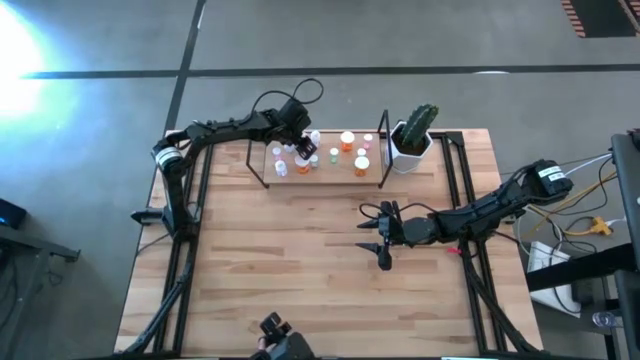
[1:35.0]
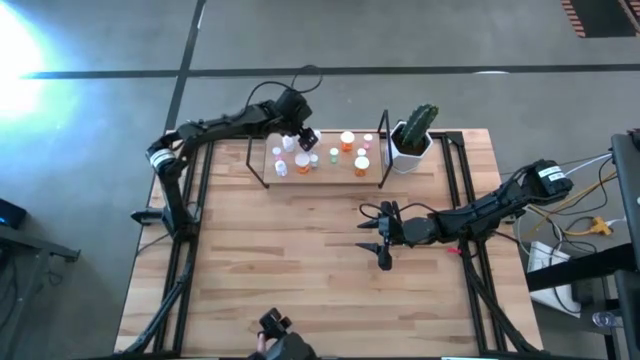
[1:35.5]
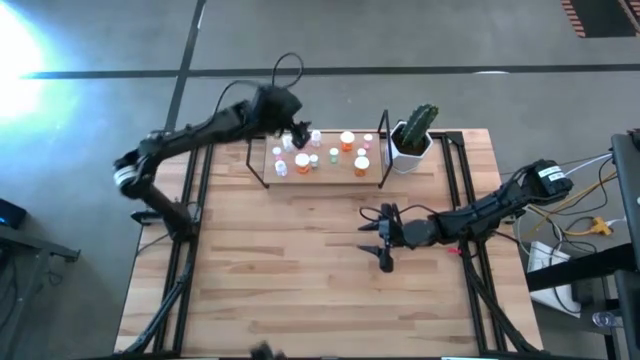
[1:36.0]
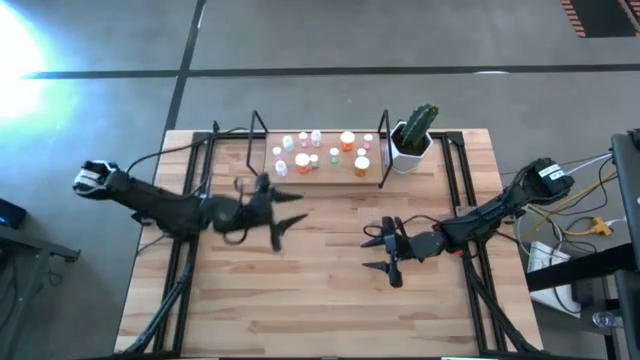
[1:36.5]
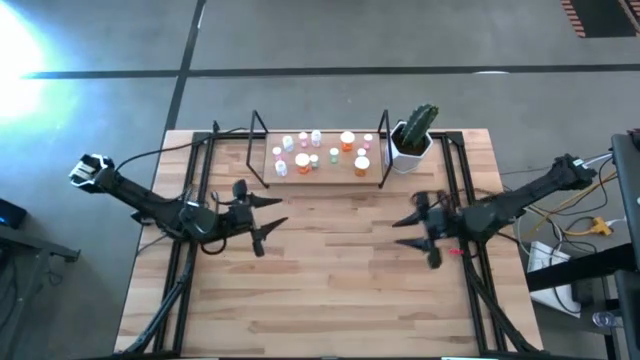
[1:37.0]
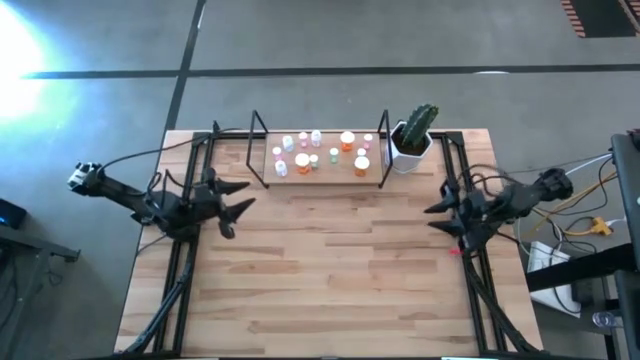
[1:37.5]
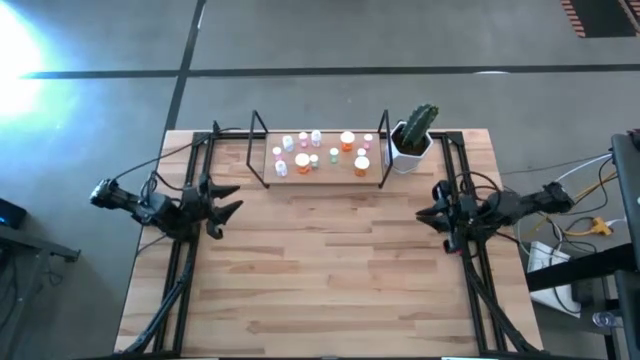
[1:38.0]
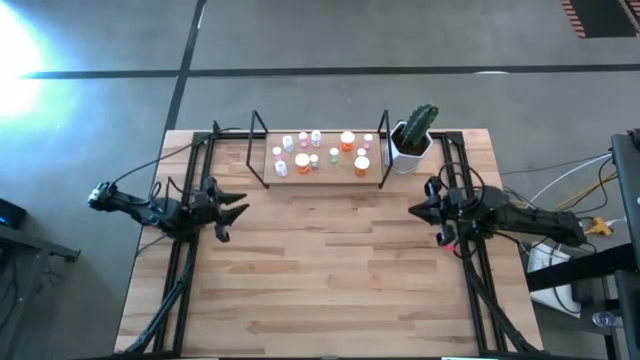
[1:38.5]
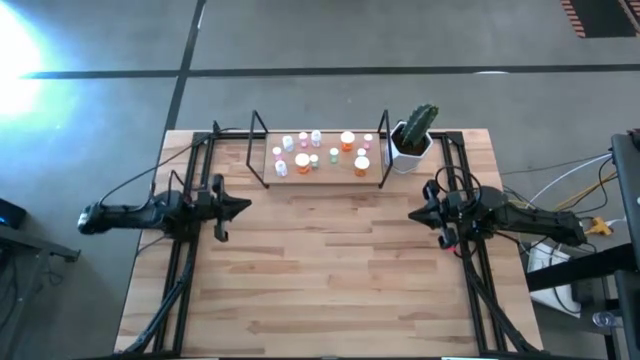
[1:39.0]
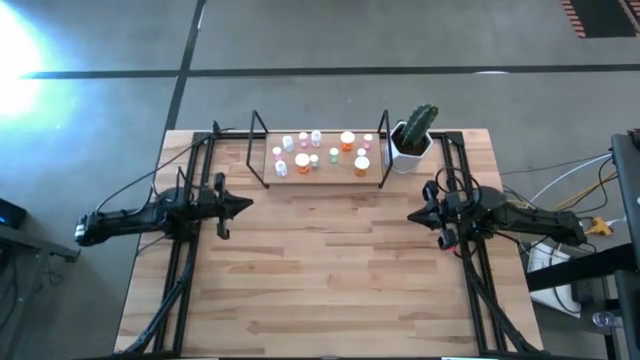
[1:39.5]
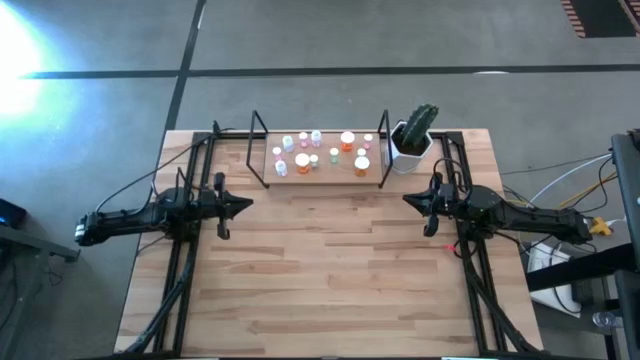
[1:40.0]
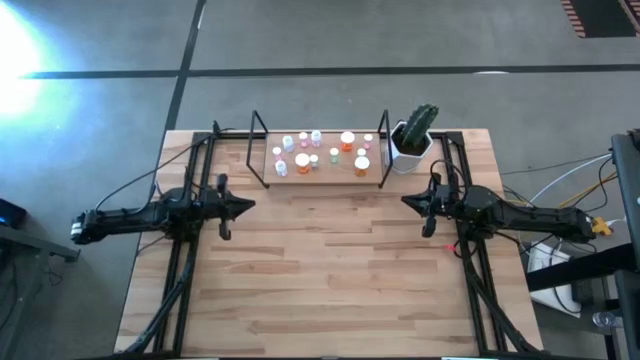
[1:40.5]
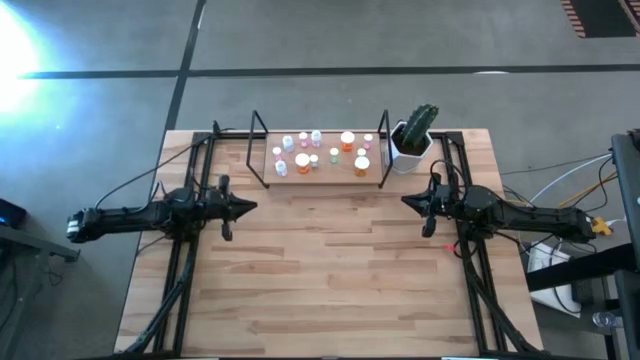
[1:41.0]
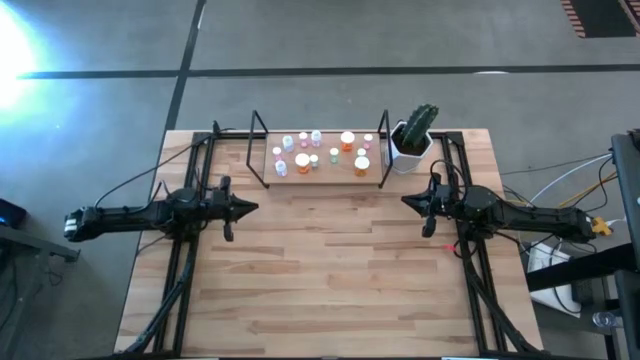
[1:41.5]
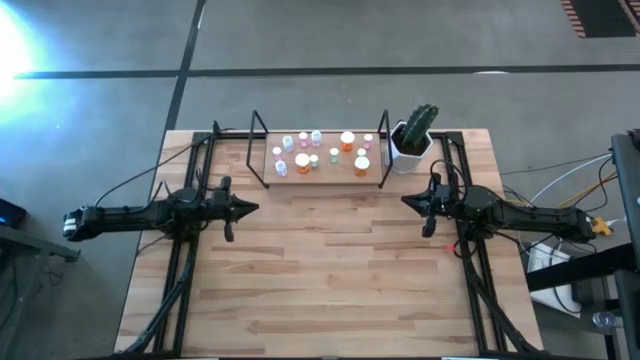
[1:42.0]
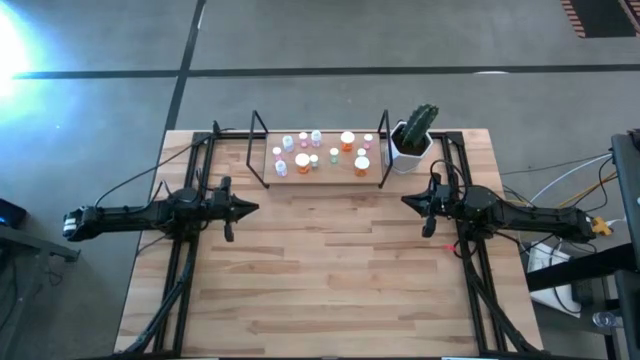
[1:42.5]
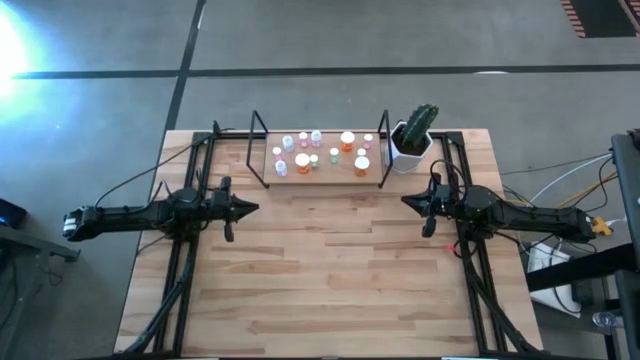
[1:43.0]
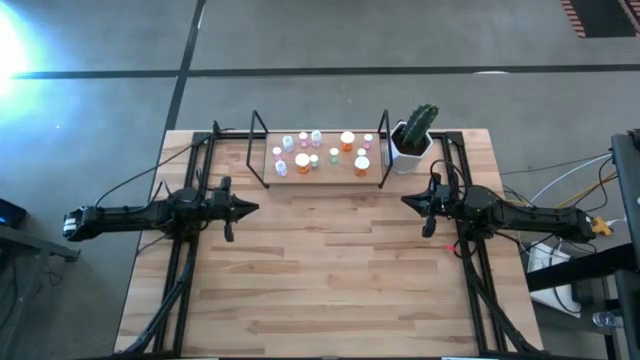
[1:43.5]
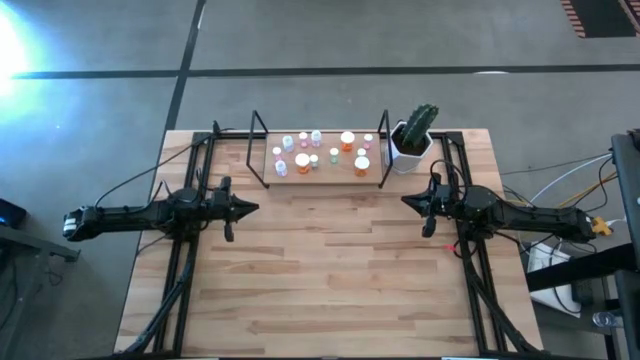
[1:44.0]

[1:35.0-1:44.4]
Task: Pick and place medicine bottles onto shelf by color
Return to Home Position

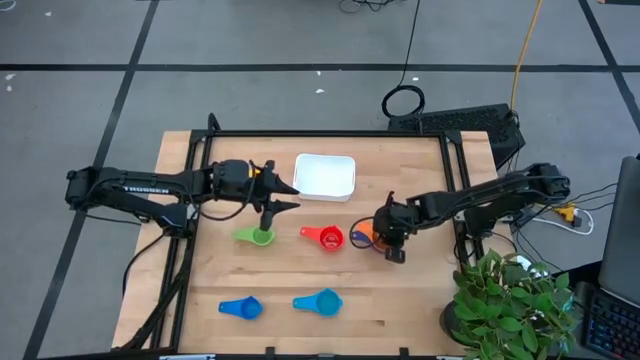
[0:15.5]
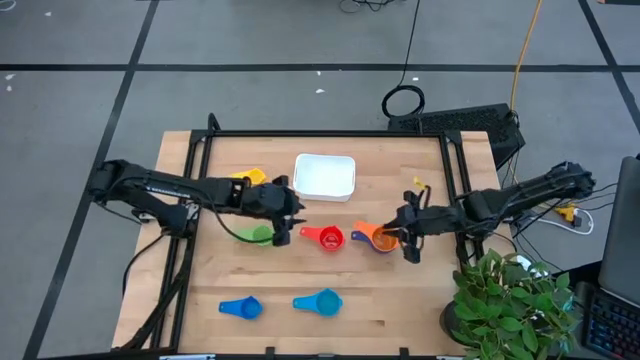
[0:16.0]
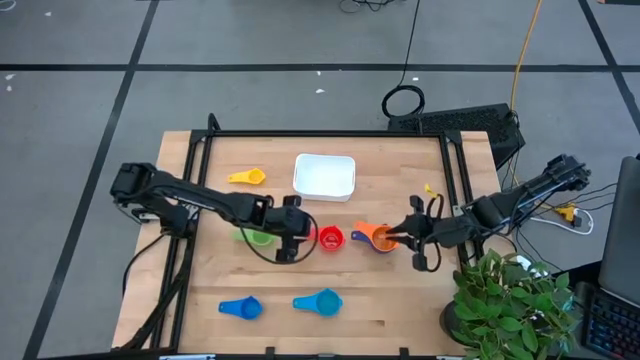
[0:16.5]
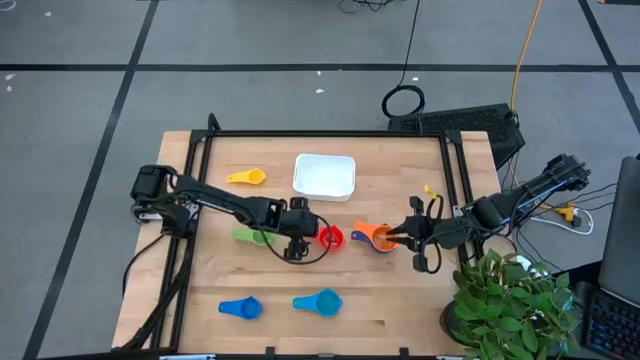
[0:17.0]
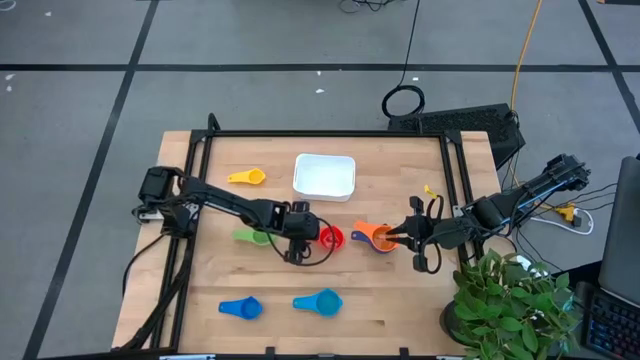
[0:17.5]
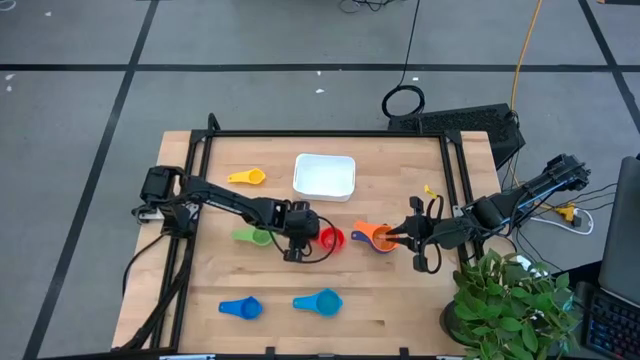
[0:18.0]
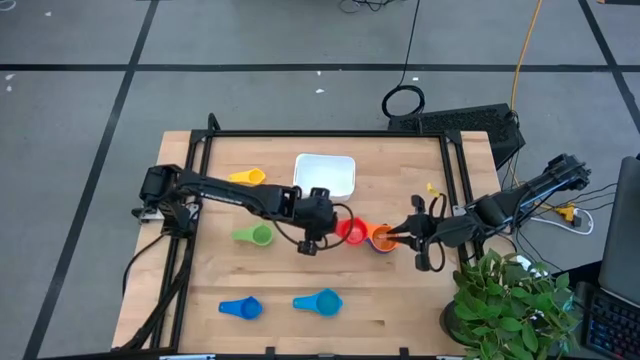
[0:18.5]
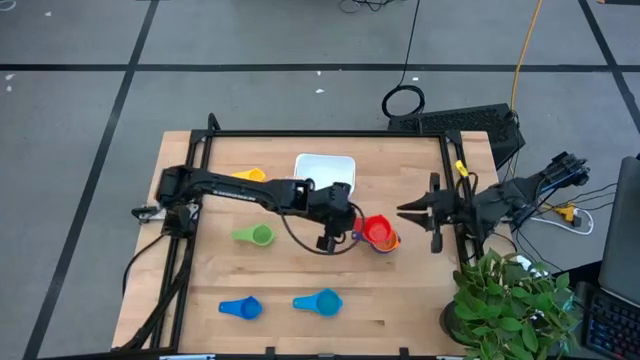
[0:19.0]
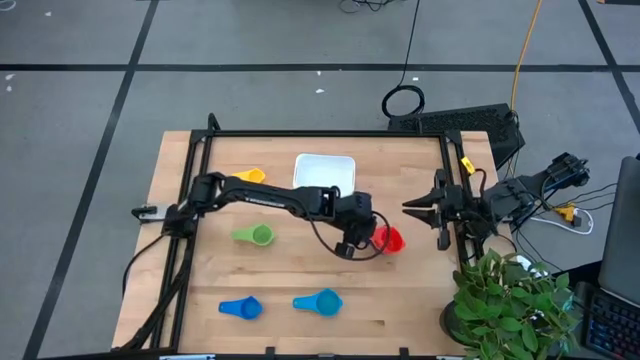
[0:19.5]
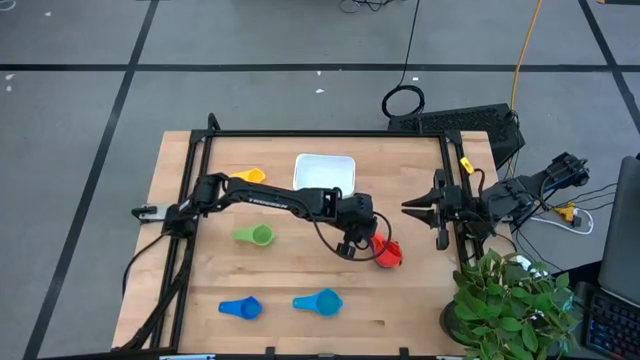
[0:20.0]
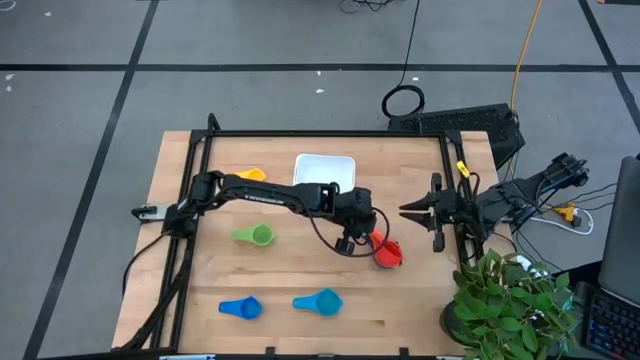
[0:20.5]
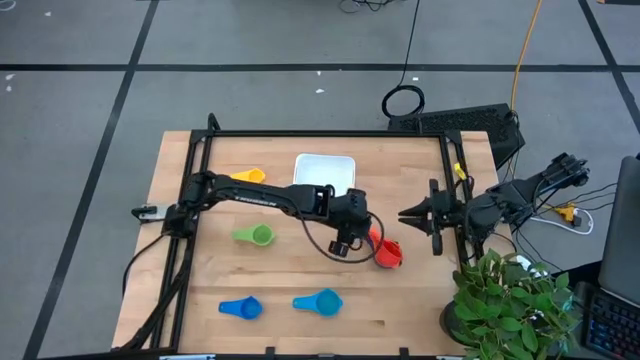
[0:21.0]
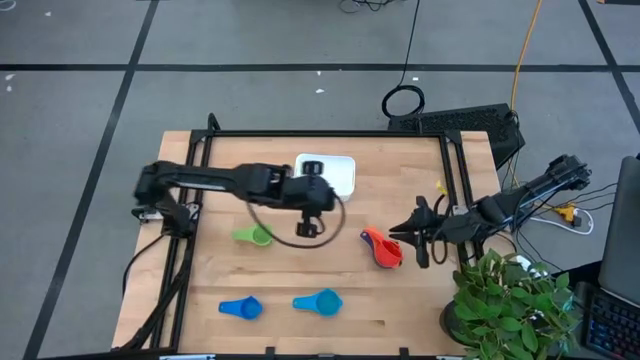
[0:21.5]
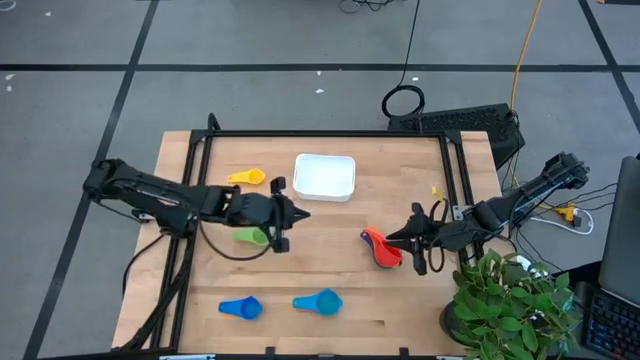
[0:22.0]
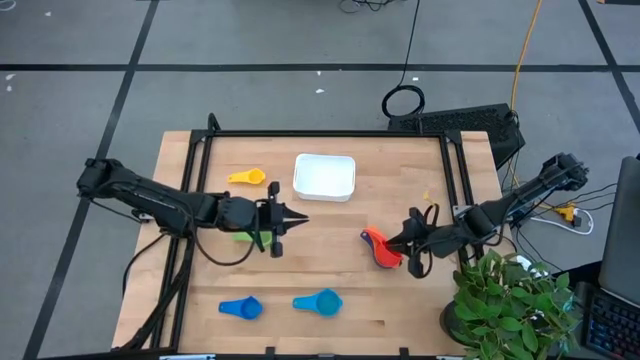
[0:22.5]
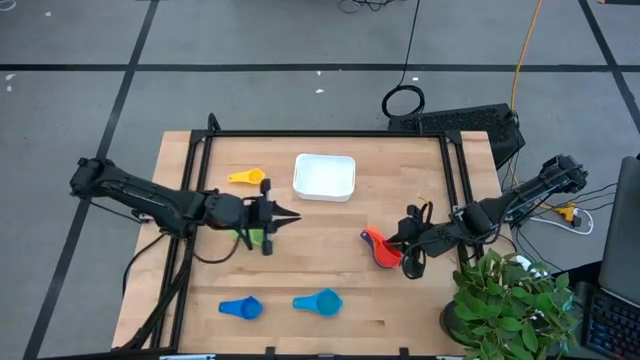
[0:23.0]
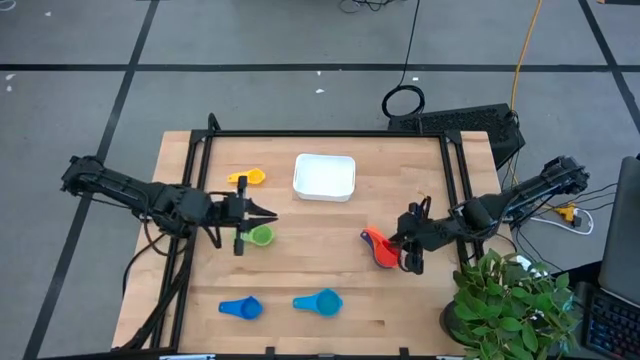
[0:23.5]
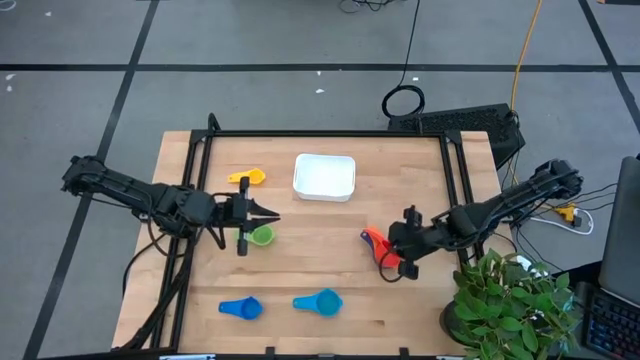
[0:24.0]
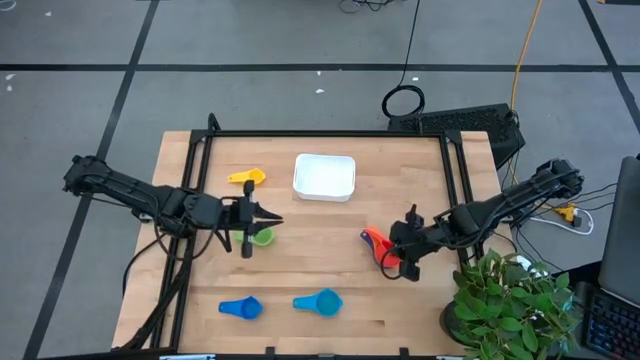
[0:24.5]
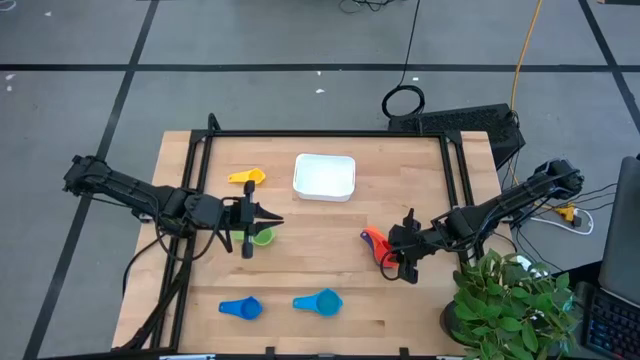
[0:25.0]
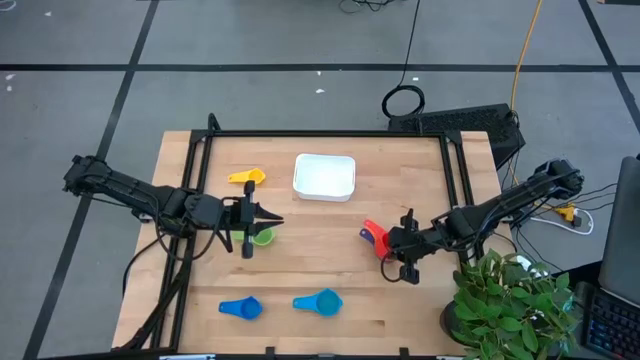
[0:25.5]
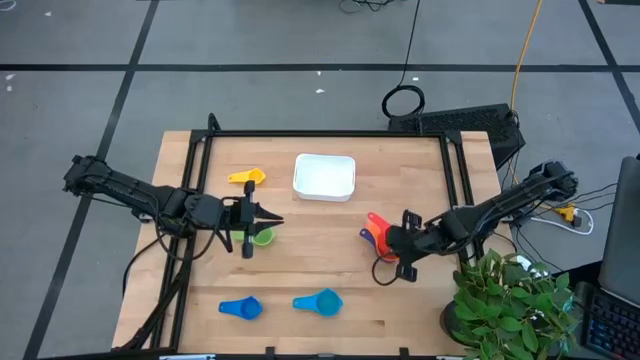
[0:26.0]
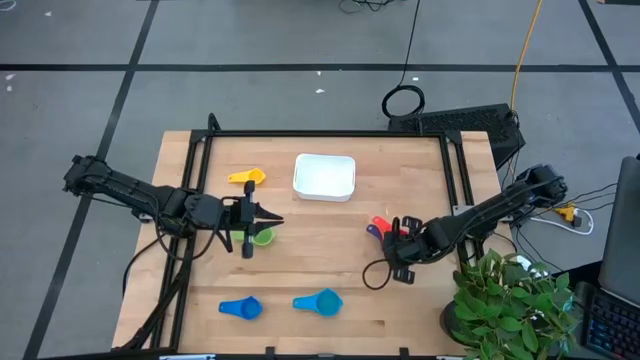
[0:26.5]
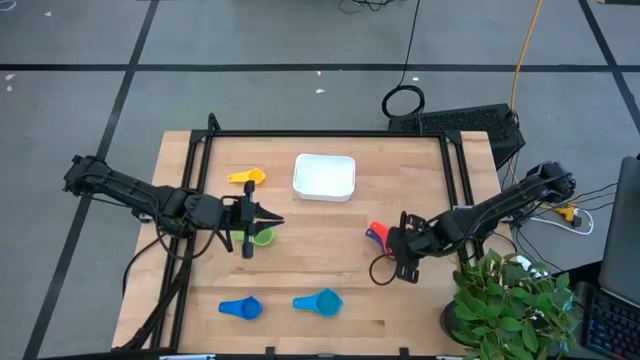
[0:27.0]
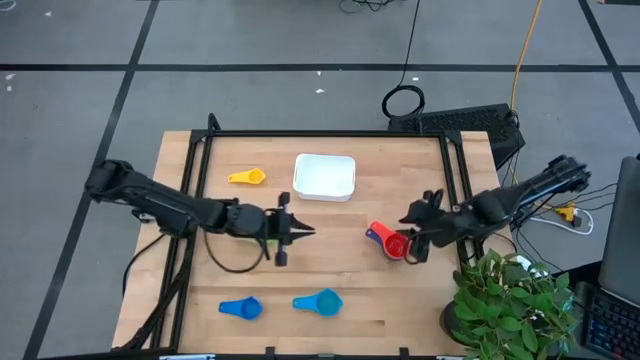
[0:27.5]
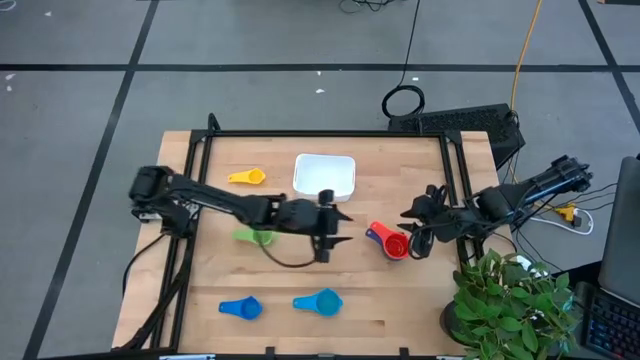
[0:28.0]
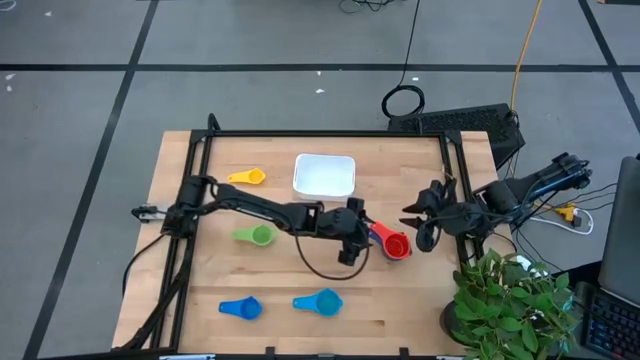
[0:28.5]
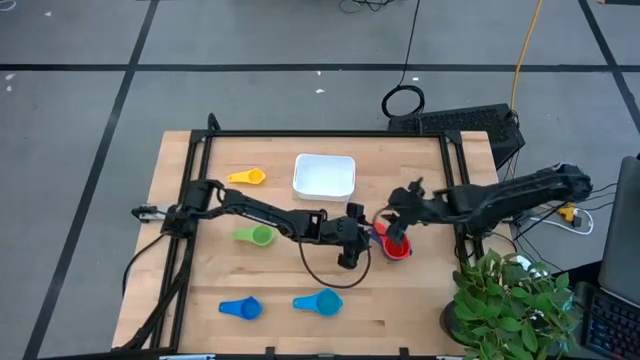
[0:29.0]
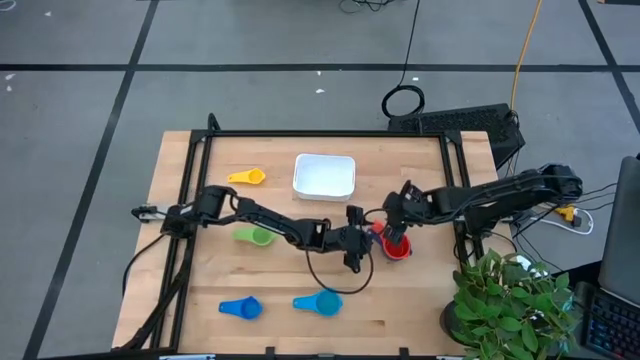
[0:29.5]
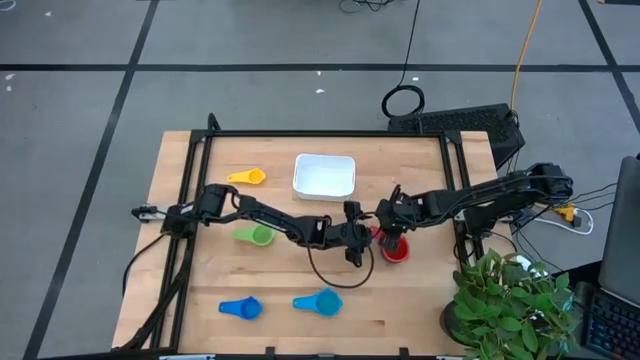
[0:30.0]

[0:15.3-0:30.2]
Task: Nest measuring cups in basket
Stack the red measuring cup on top of the orange measuring cup
